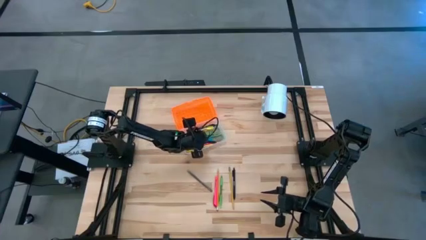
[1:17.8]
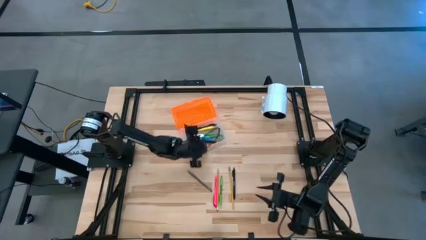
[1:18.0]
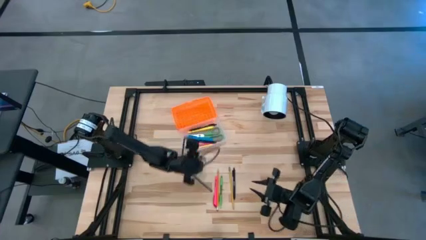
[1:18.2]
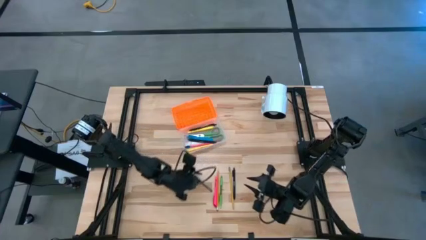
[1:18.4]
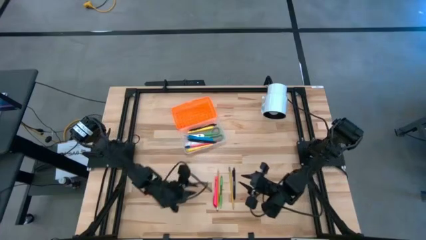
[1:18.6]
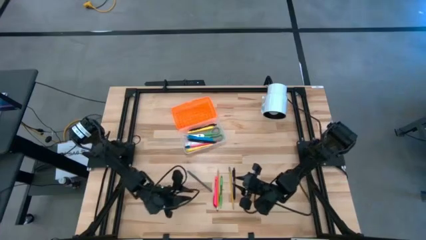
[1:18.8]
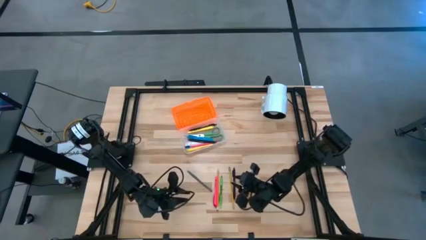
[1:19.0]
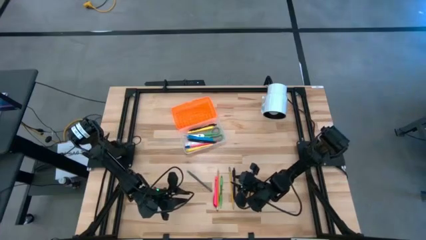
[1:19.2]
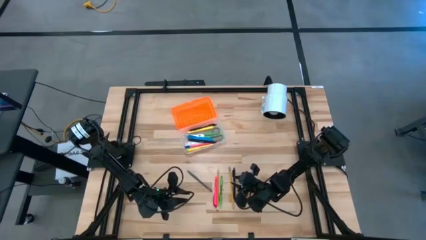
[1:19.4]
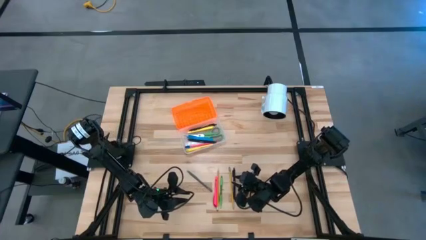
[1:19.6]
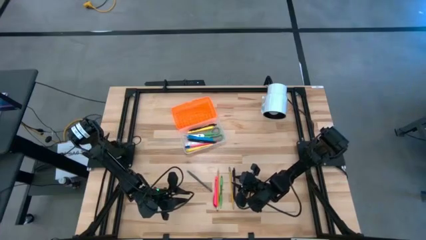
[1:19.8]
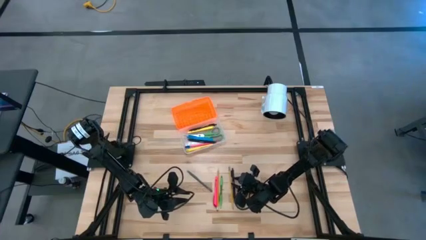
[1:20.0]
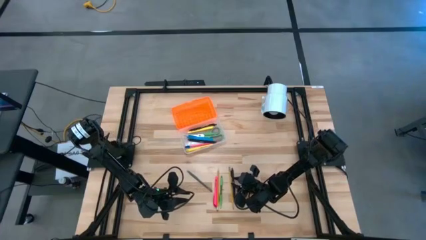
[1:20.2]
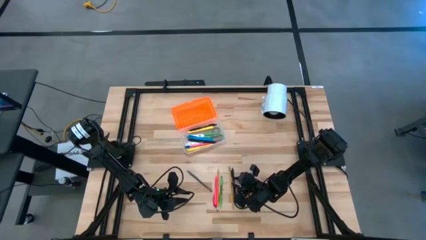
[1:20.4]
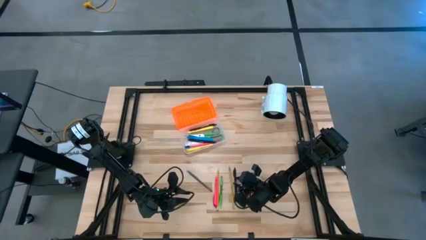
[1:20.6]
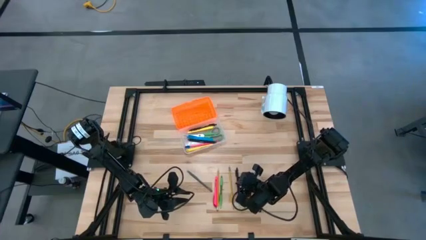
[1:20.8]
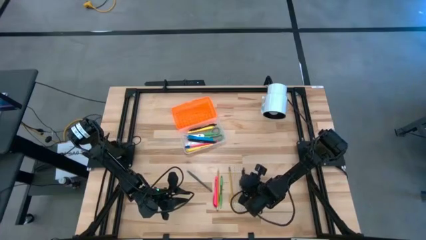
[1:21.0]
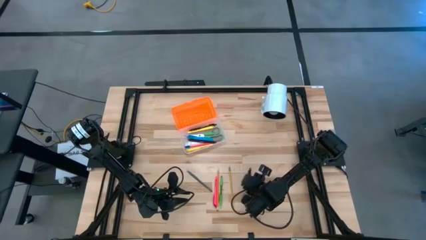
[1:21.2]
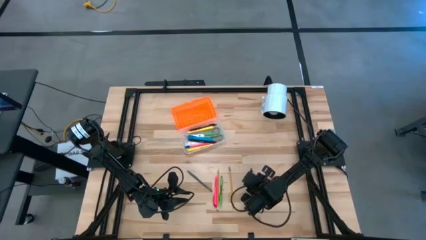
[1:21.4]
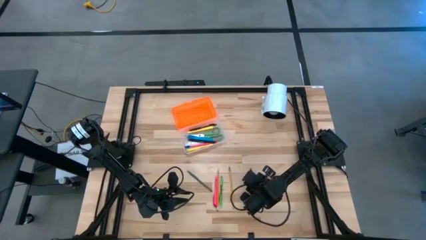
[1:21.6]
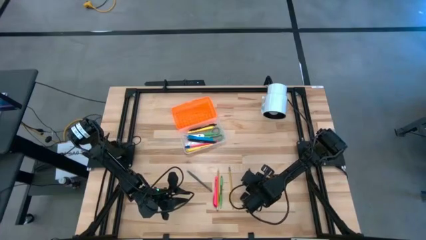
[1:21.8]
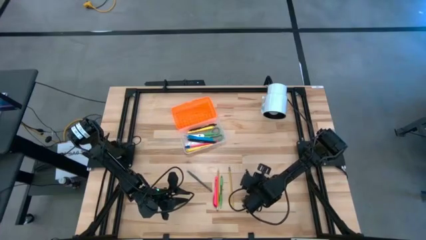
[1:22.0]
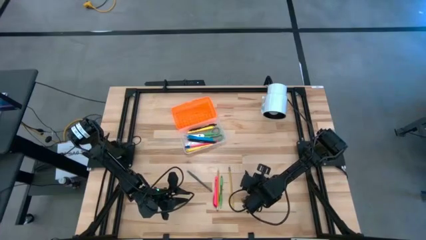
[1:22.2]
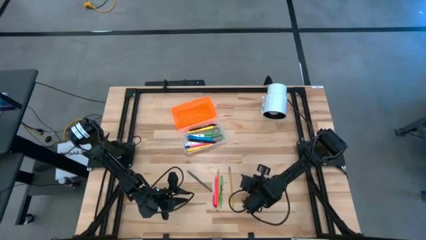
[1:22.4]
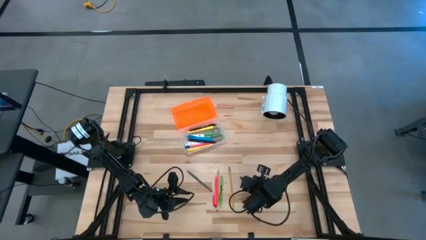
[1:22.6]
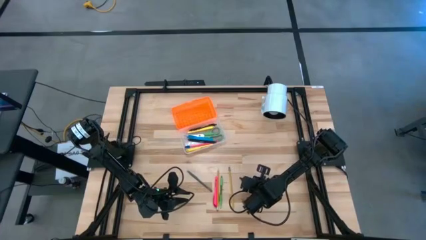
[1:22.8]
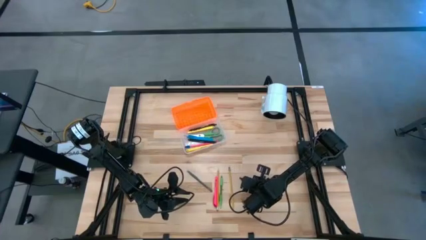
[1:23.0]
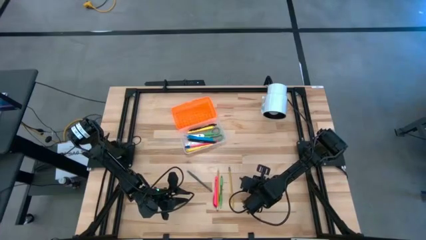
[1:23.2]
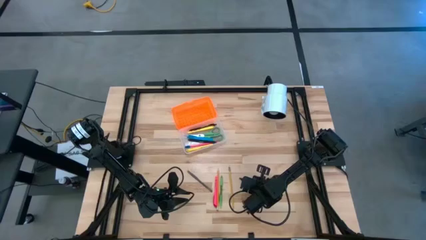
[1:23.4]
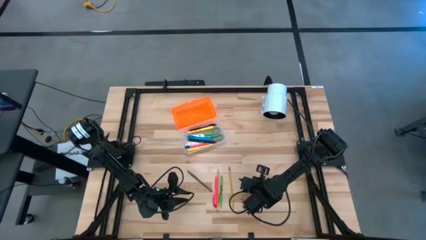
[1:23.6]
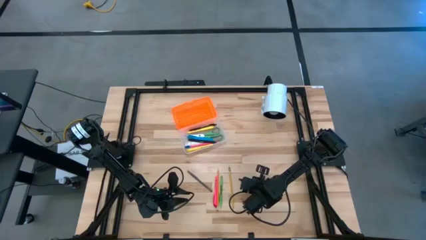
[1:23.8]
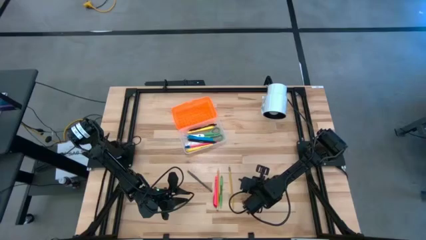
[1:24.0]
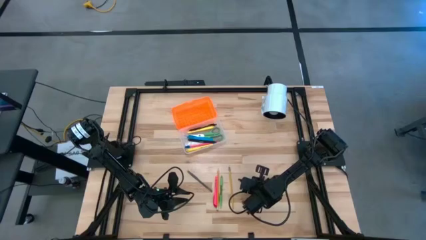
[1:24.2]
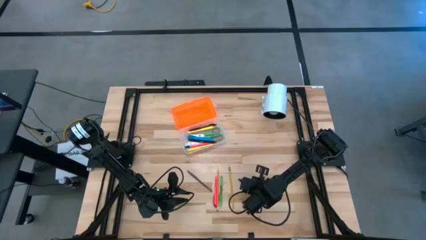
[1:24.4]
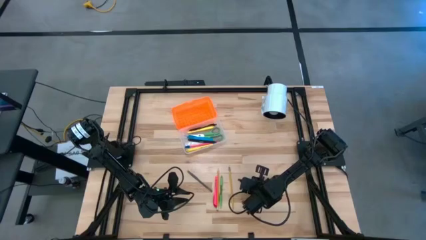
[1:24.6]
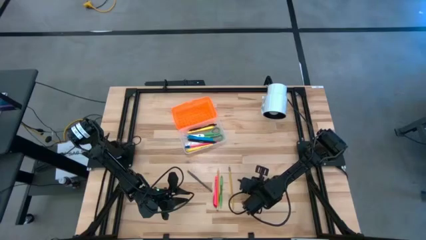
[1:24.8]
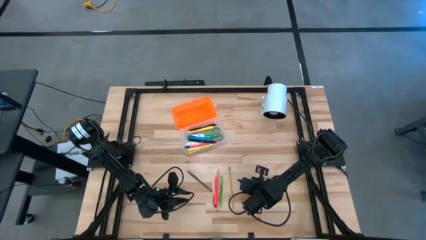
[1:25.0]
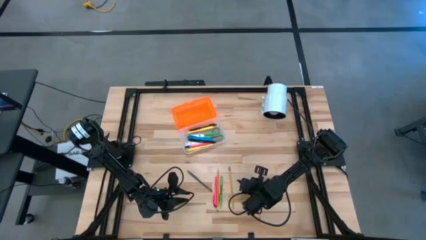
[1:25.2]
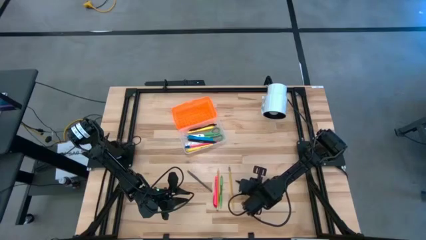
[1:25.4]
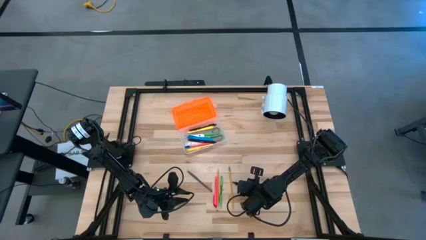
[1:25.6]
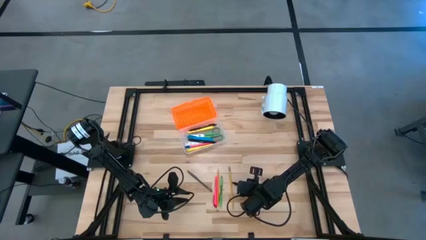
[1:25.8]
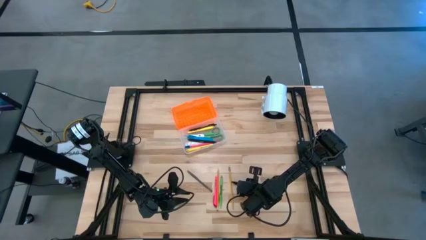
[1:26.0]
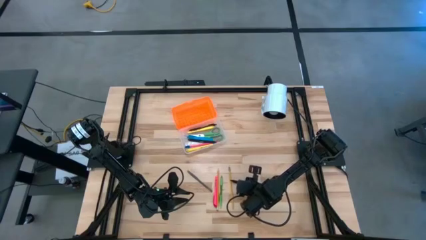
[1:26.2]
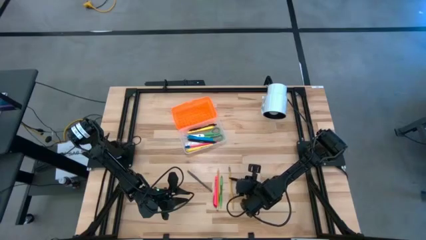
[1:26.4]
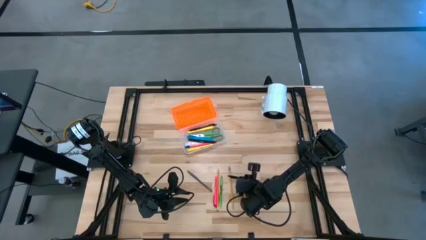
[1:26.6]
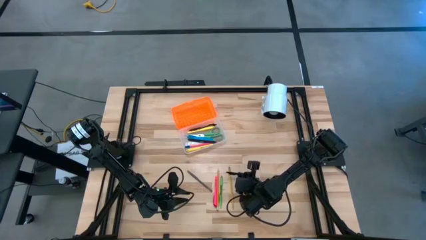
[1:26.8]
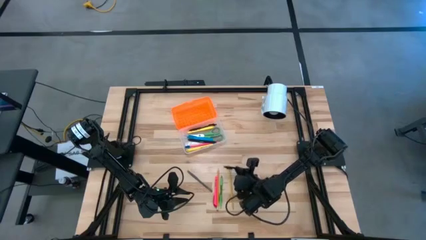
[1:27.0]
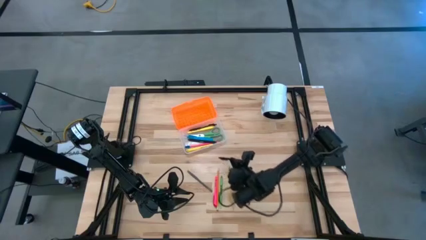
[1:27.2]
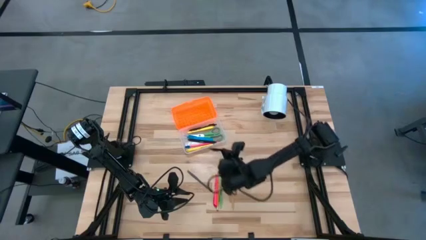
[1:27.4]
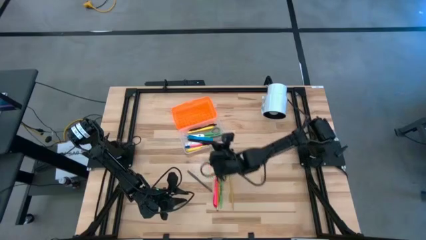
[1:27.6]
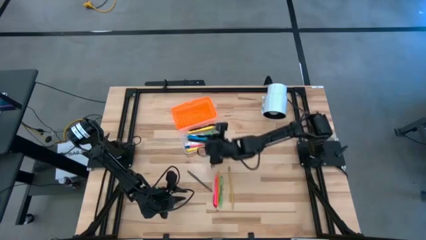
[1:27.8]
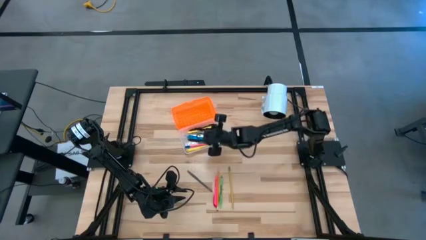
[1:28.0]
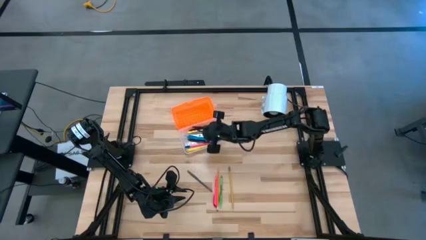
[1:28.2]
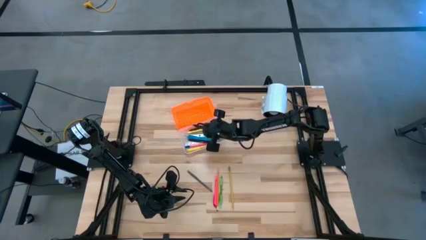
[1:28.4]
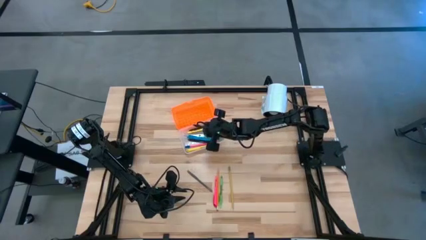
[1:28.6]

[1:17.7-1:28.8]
Task: Pick & place school supplies into a supply box
Put the black pen into the supply box

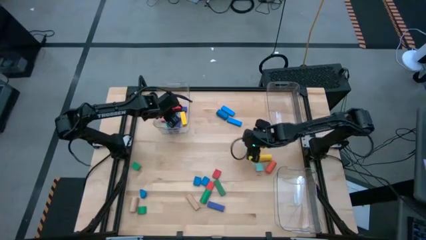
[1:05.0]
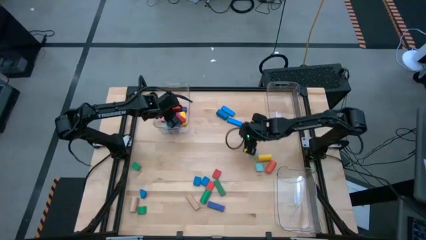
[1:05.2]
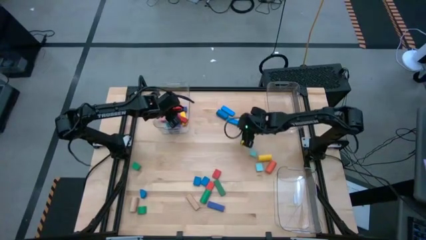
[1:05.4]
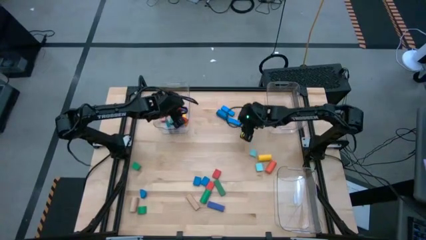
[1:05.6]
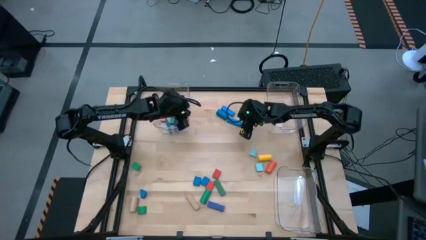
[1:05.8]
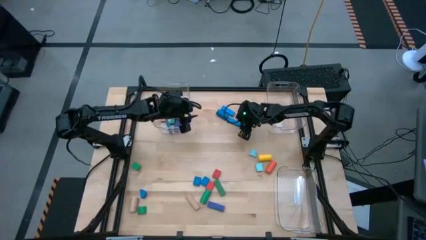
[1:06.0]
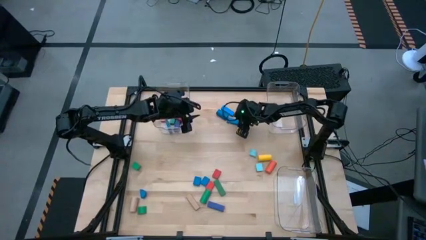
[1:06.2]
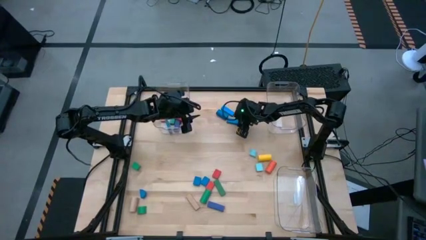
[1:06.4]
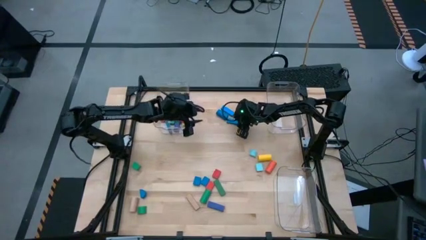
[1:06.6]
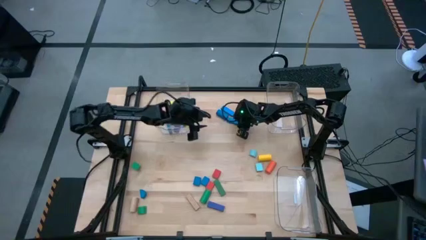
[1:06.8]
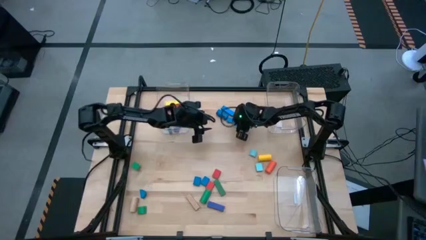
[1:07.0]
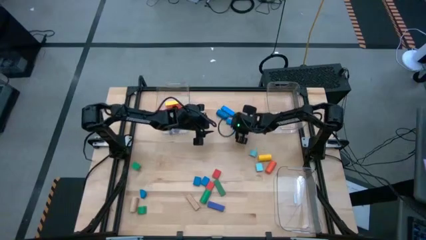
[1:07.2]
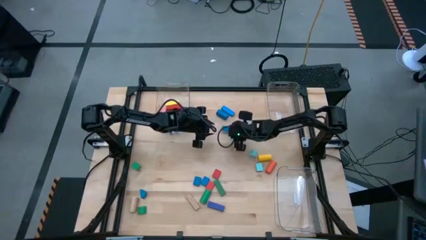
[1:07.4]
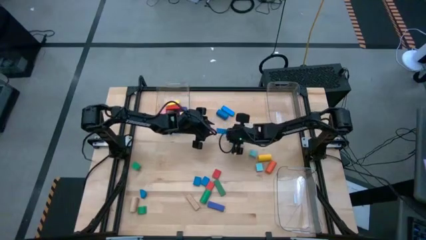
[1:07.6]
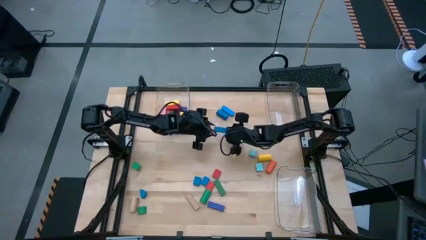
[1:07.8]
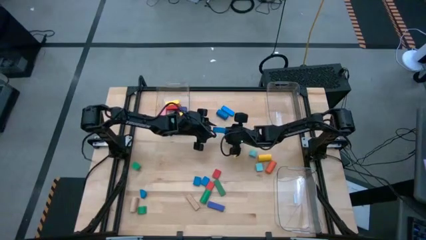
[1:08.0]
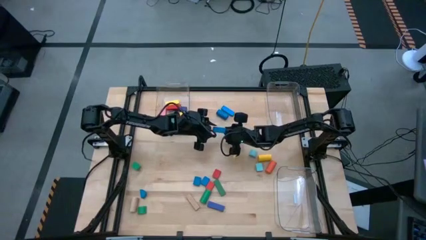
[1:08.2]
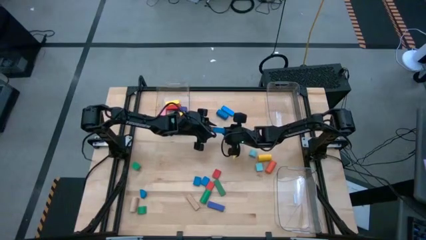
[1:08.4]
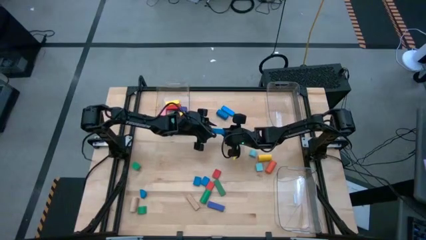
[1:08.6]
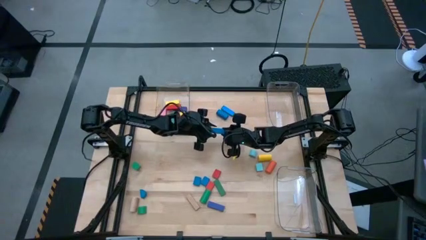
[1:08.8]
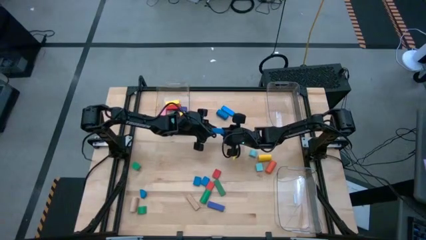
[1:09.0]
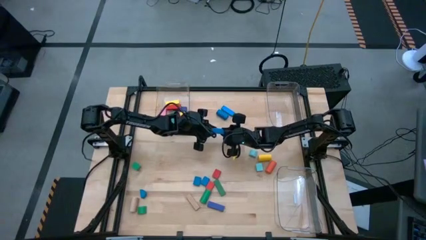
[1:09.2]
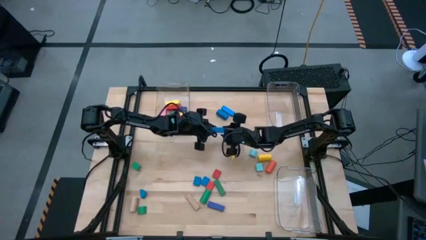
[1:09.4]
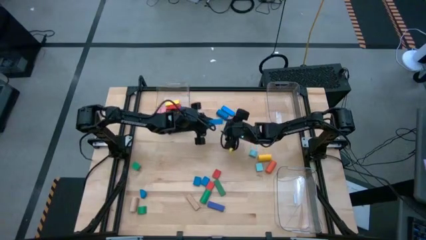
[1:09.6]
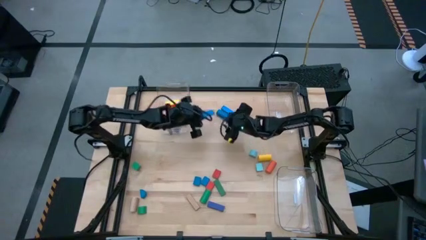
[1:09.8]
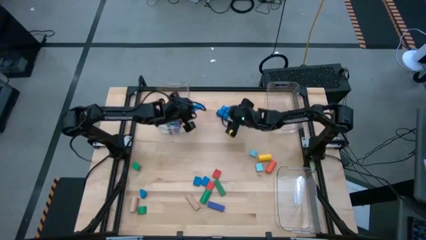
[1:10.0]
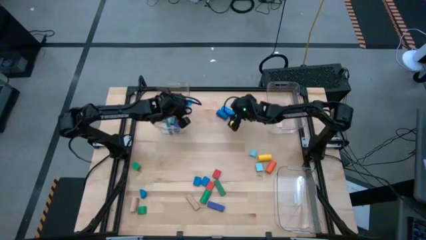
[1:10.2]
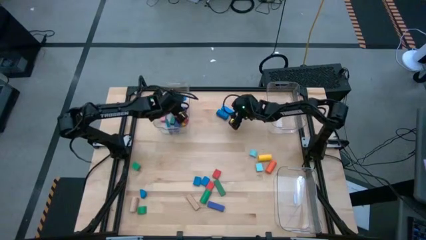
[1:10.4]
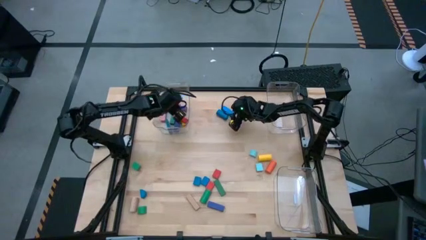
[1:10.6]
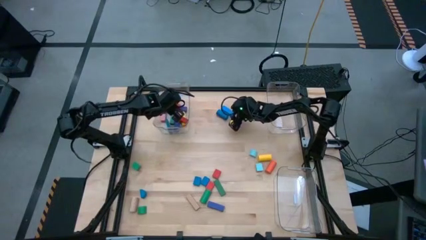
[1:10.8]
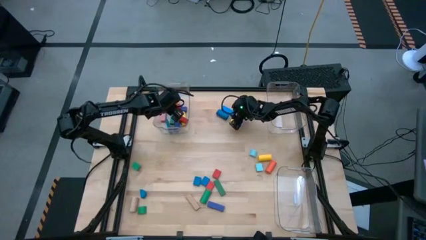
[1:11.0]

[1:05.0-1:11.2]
Task: Sort blocks by size
Put the blue rectangle block into the top left transparent bin
